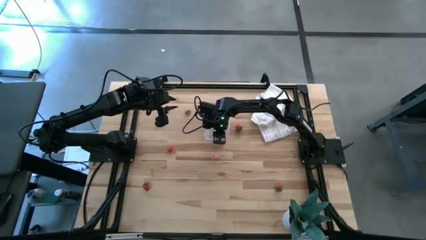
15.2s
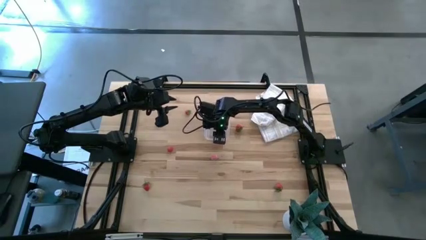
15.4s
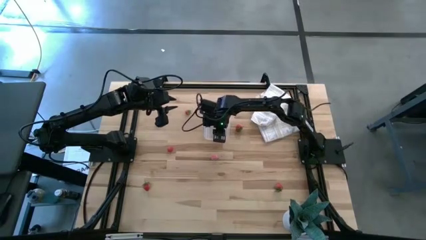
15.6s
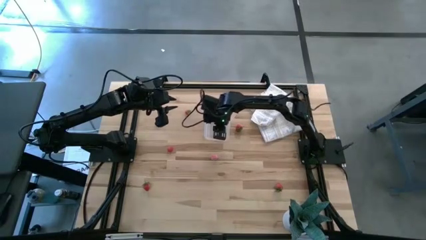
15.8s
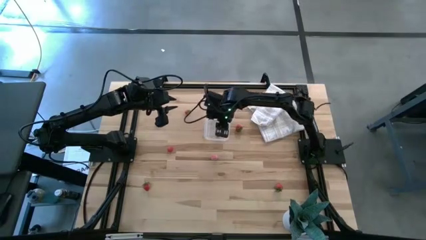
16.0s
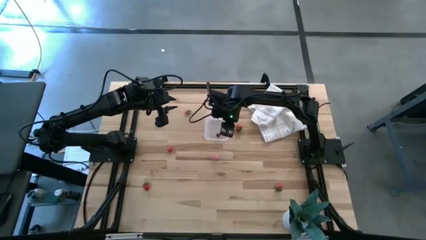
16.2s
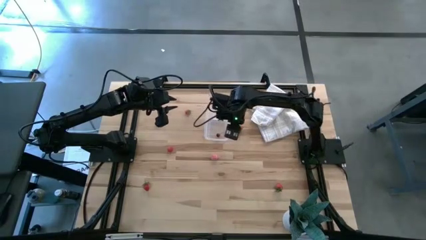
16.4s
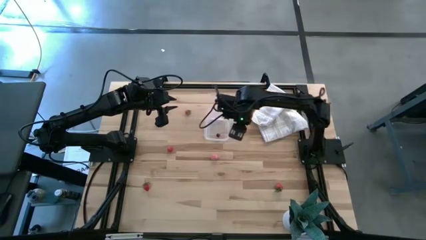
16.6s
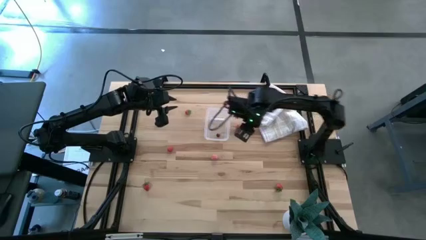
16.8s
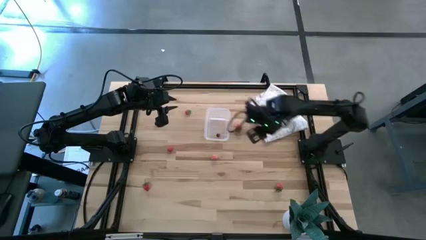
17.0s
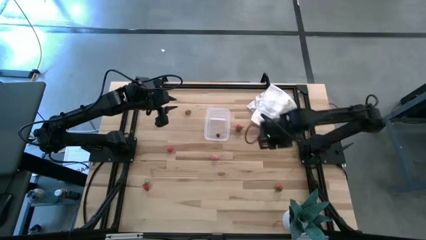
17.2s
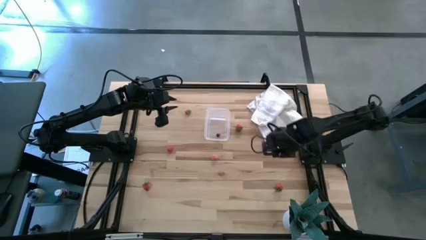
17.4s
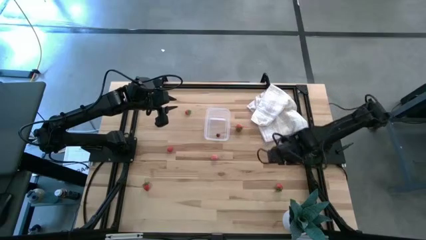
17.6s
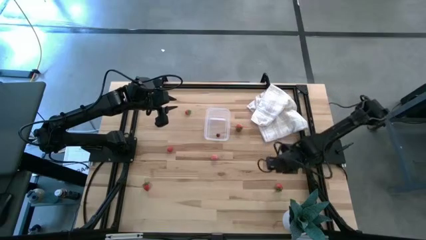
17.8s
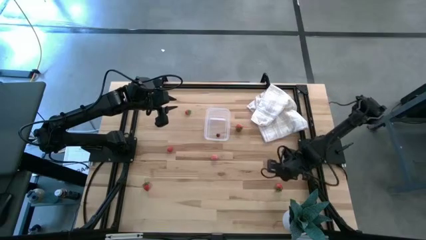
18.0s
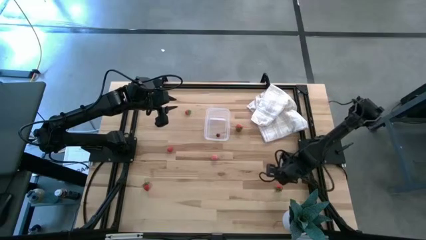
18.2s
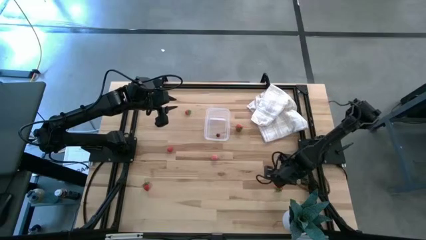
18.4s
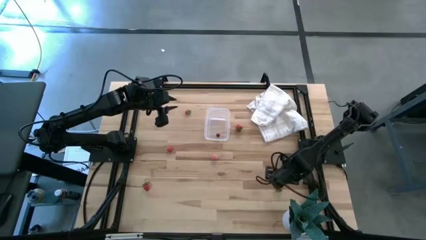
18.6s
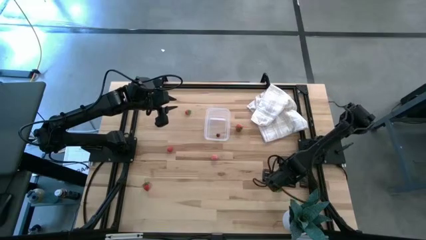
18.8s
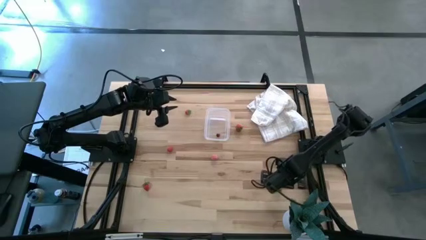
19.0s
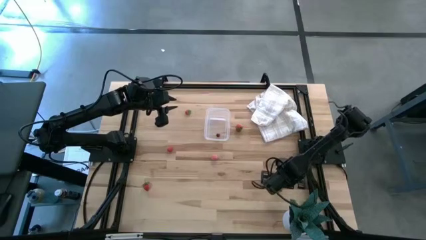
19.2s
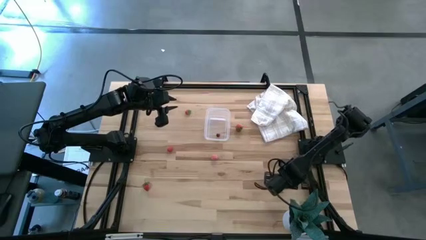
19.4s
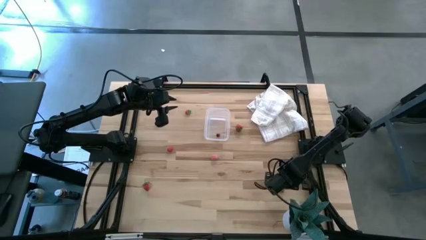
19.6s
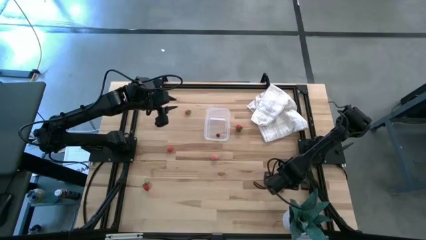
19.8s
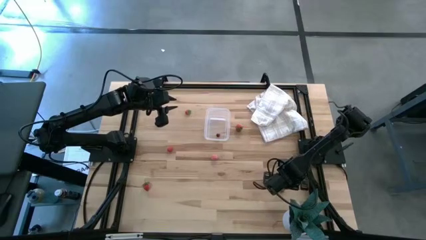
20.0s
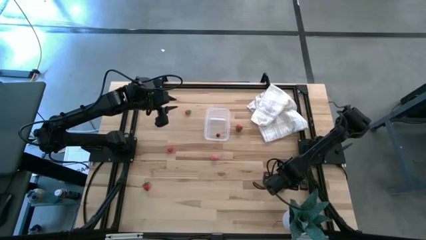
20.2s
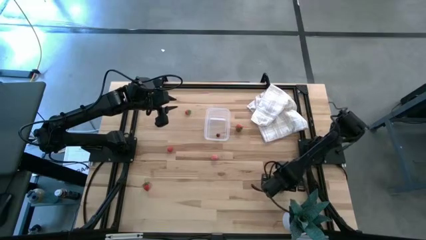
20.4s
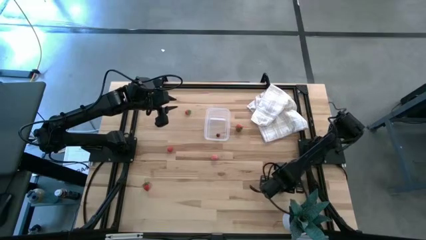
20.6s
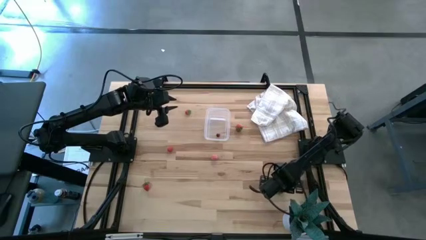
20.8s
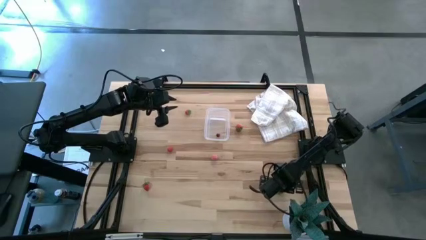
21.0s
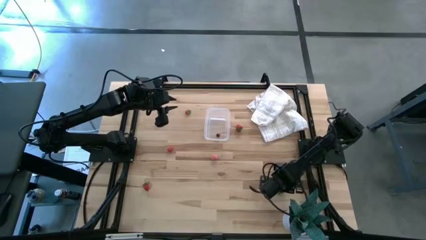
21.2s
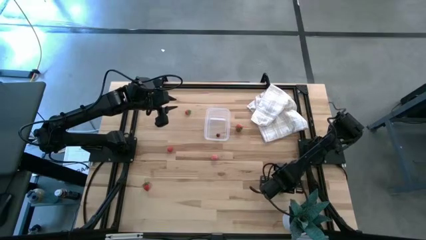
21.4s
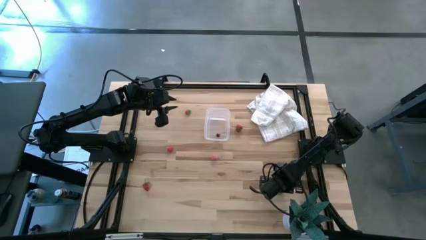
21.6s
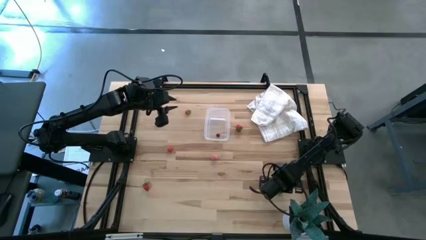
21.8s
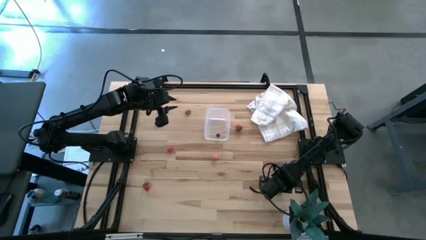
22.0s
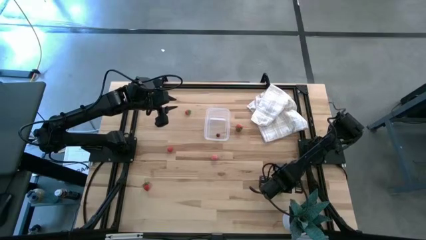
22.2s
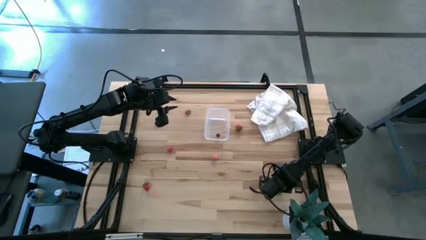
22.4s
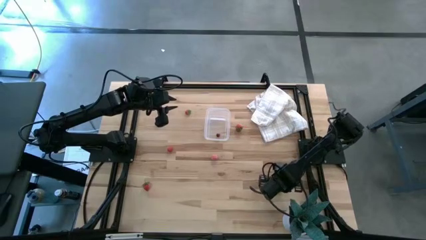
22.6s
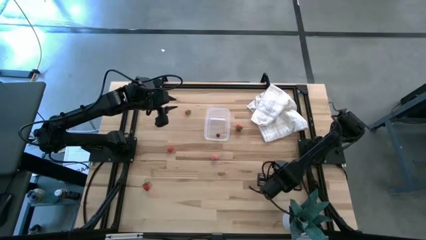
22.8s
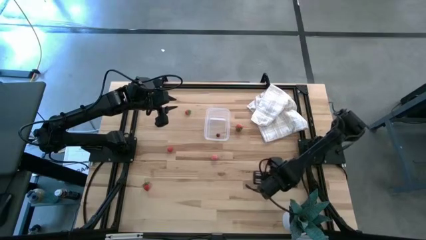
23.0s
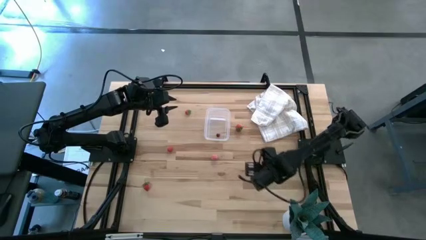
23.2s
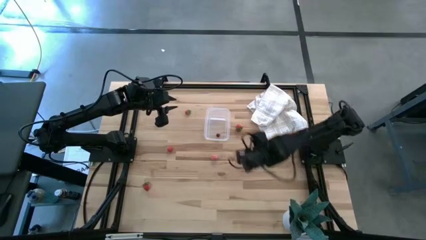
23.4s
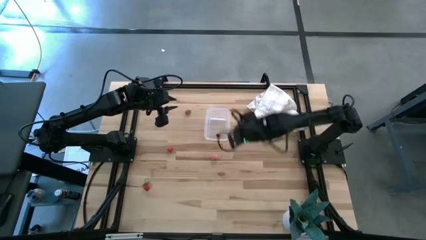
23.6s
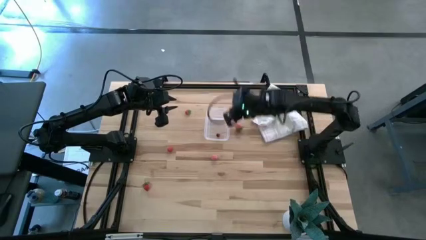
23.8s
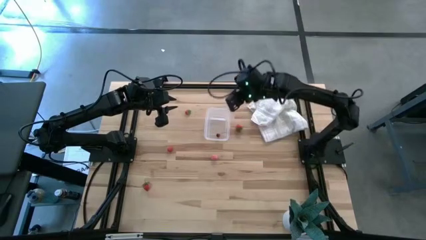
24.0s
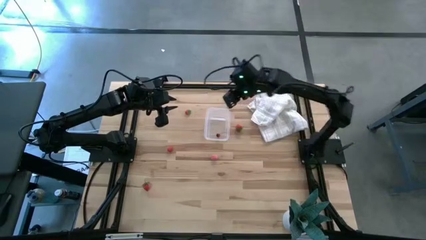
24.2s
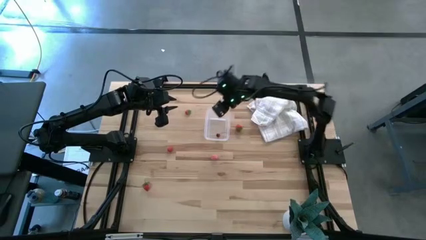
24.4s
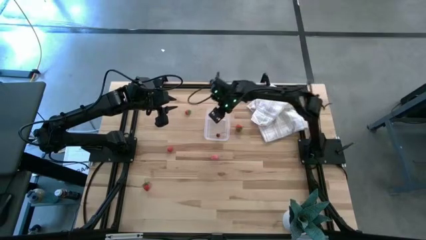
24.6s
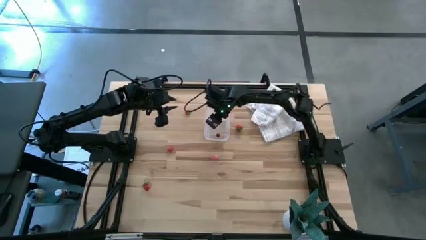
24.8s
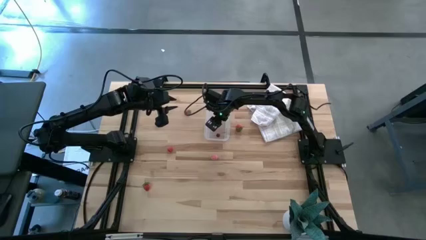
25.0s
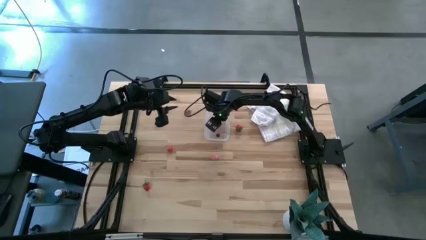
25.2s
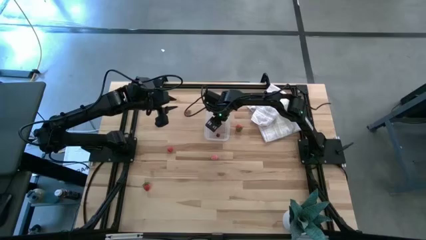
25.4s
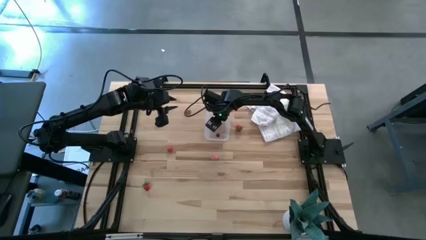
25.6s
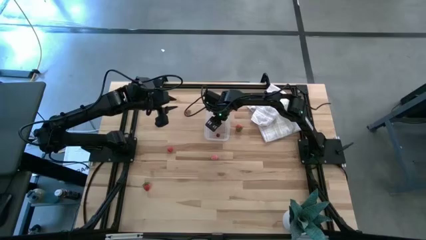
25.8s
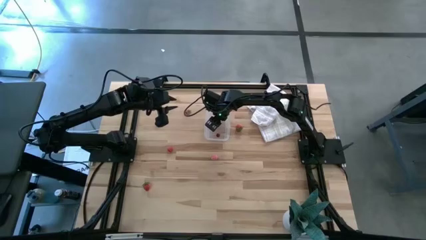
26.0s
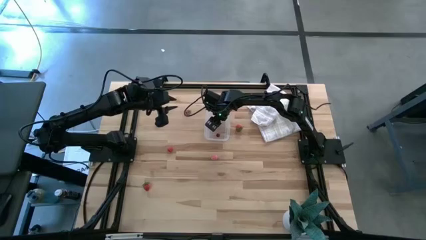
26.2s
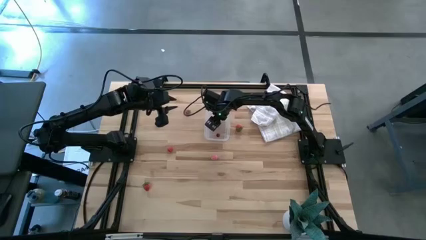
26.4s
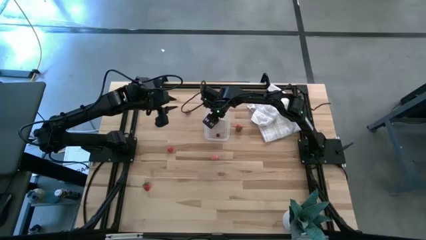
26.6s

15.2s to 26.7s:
Task: Pick and placing Produce into tupperware
Put the strawberry into the transparent container
